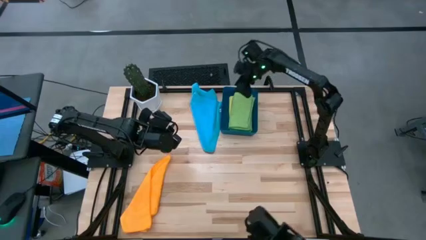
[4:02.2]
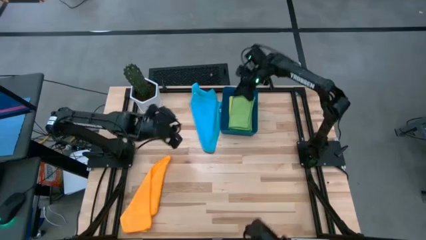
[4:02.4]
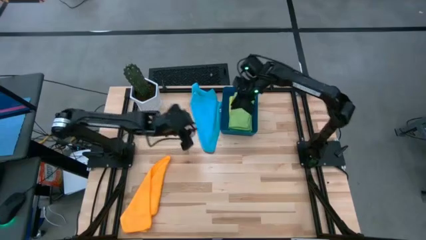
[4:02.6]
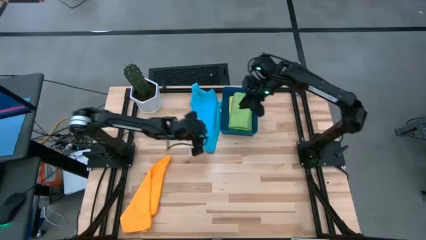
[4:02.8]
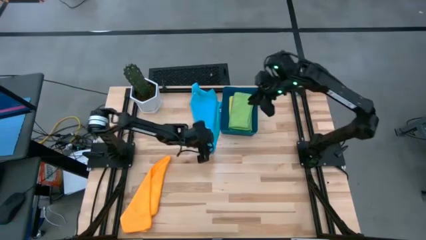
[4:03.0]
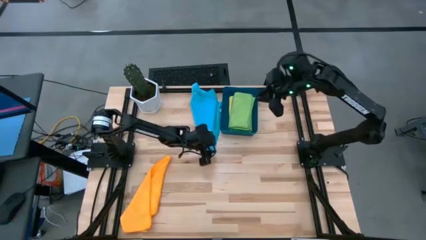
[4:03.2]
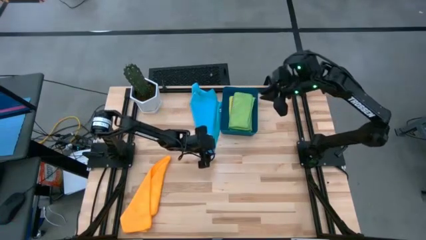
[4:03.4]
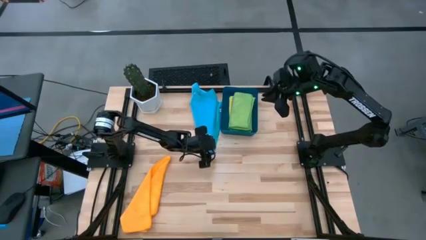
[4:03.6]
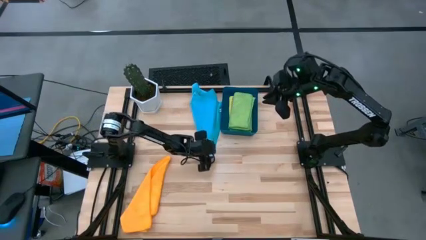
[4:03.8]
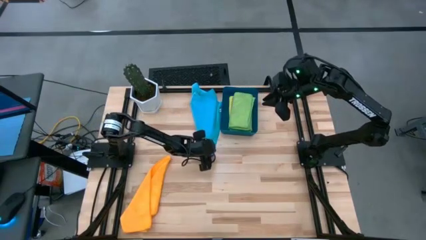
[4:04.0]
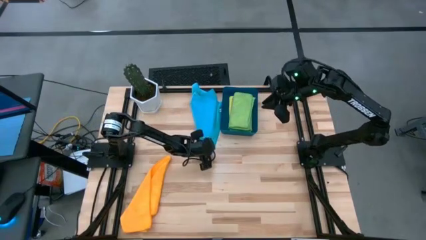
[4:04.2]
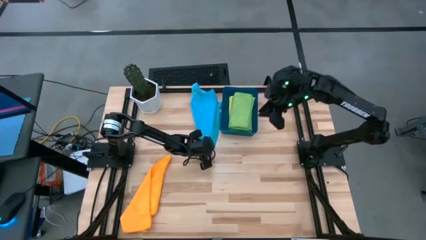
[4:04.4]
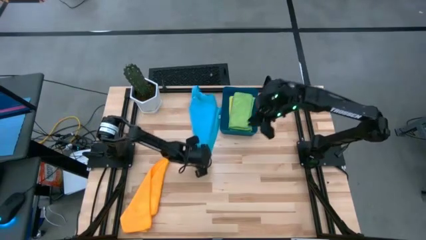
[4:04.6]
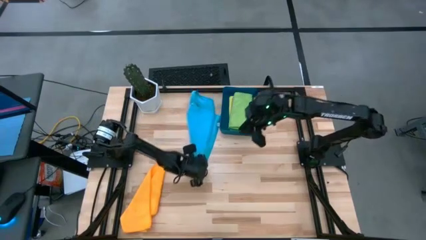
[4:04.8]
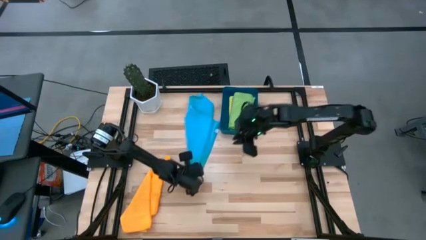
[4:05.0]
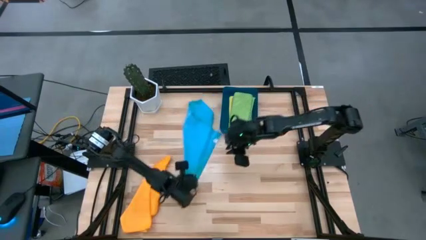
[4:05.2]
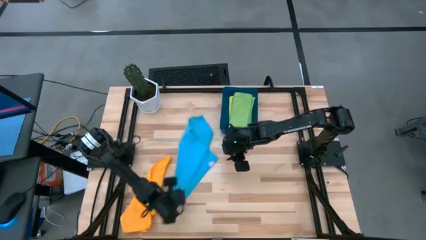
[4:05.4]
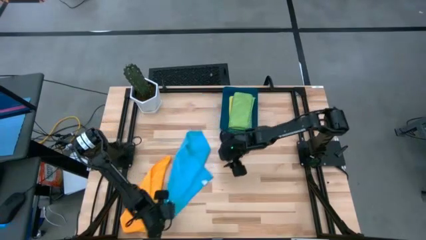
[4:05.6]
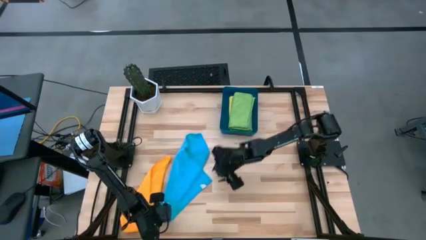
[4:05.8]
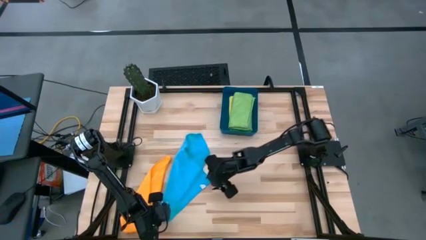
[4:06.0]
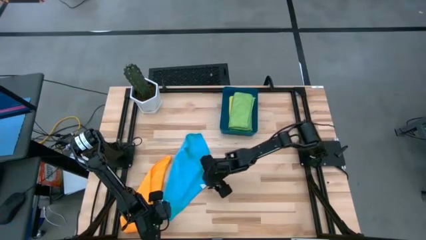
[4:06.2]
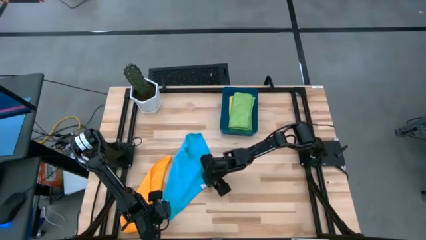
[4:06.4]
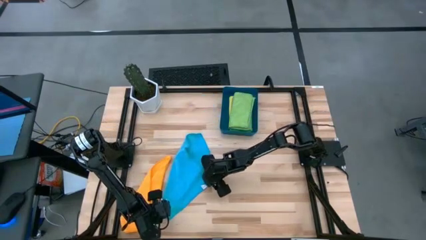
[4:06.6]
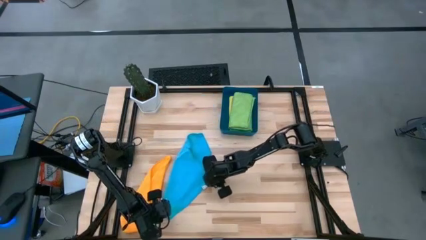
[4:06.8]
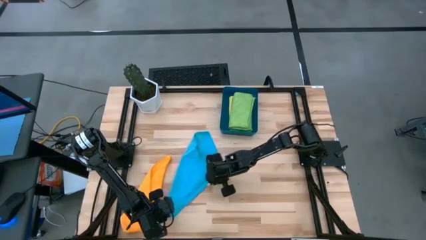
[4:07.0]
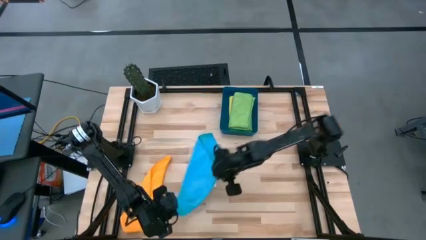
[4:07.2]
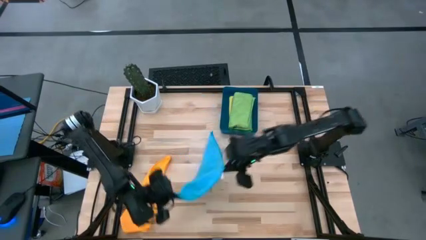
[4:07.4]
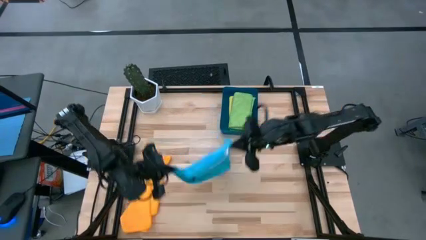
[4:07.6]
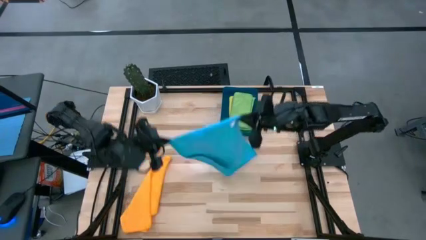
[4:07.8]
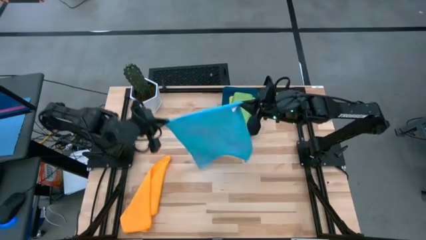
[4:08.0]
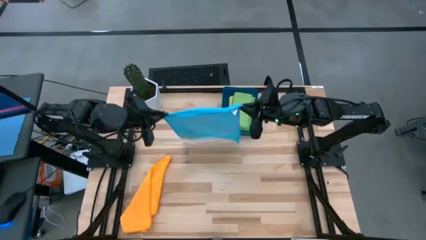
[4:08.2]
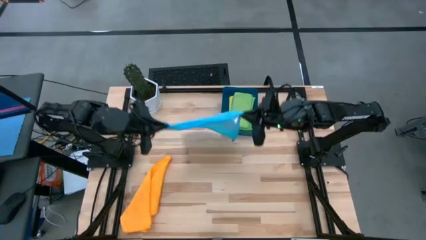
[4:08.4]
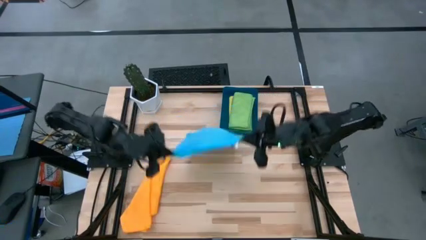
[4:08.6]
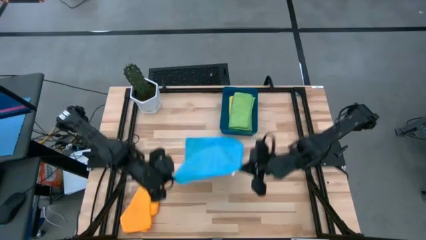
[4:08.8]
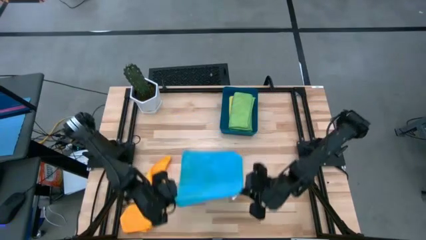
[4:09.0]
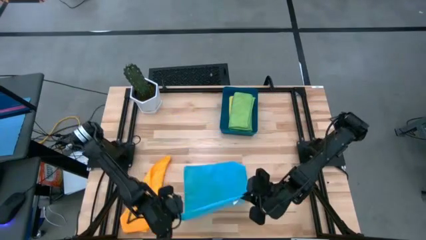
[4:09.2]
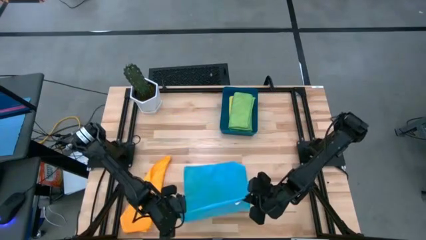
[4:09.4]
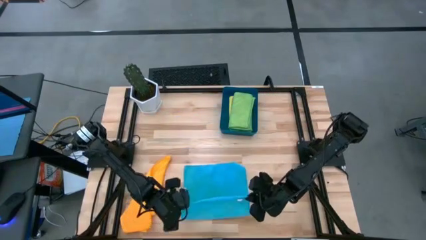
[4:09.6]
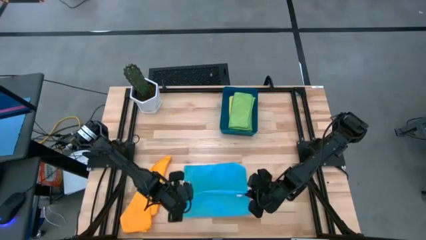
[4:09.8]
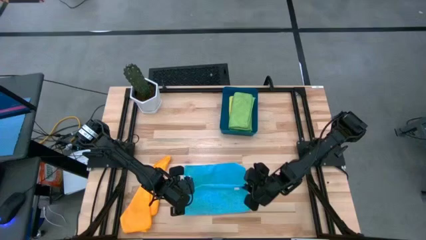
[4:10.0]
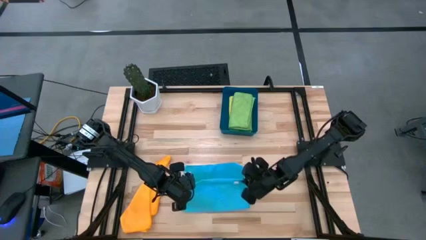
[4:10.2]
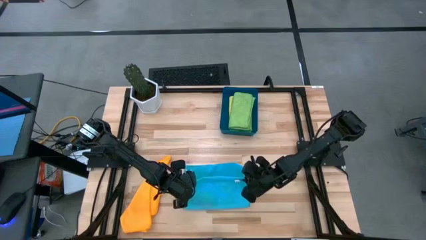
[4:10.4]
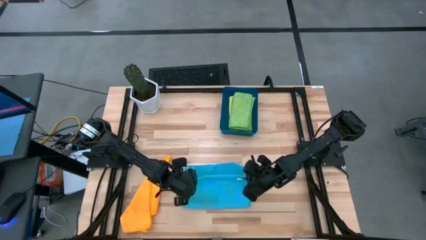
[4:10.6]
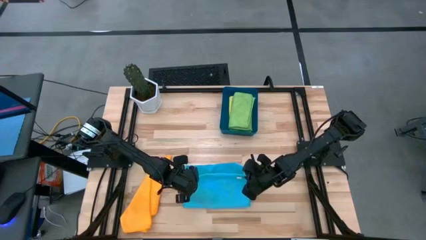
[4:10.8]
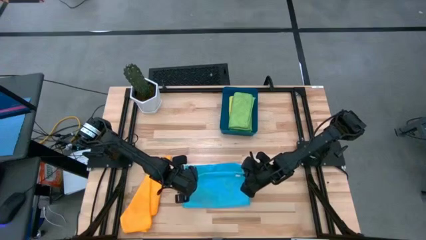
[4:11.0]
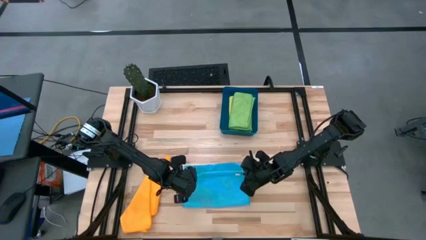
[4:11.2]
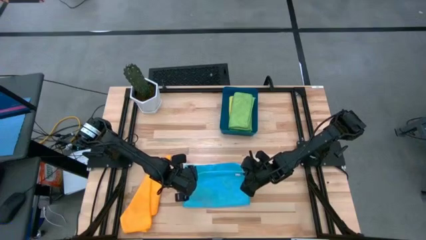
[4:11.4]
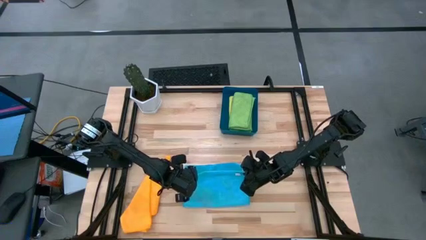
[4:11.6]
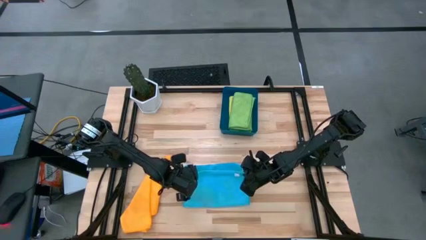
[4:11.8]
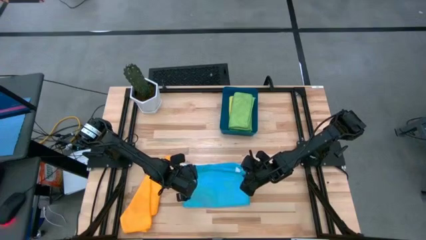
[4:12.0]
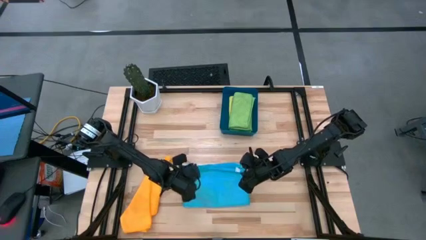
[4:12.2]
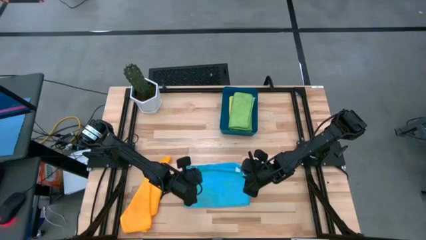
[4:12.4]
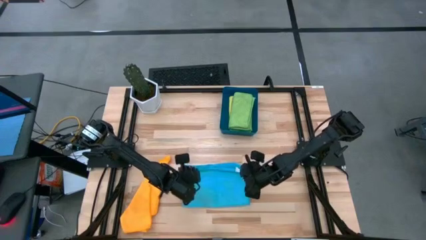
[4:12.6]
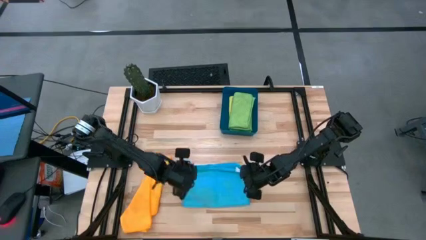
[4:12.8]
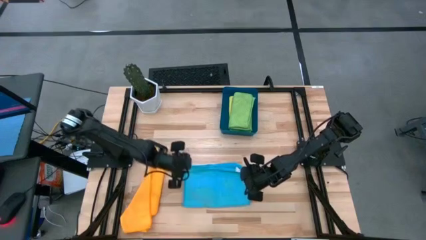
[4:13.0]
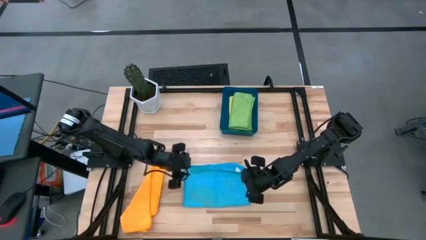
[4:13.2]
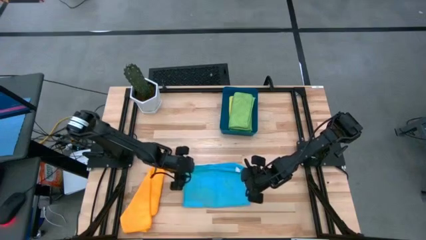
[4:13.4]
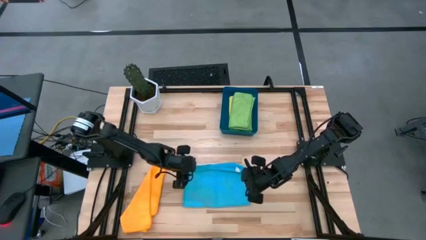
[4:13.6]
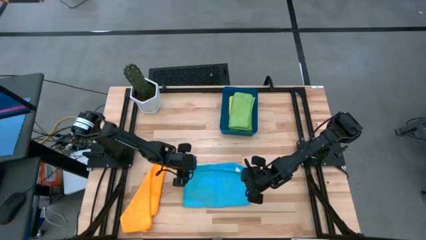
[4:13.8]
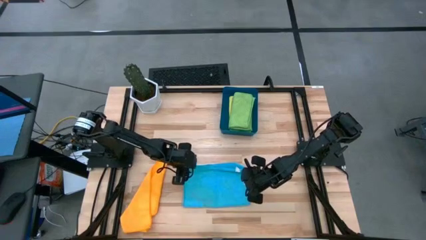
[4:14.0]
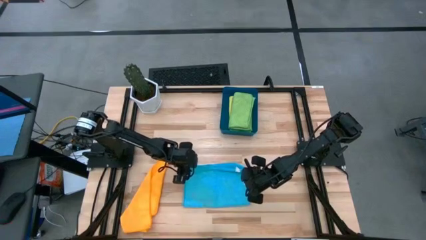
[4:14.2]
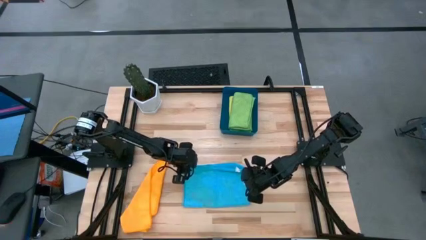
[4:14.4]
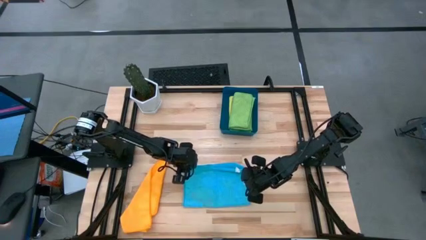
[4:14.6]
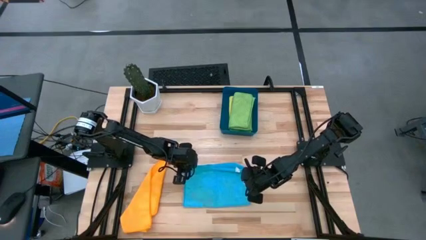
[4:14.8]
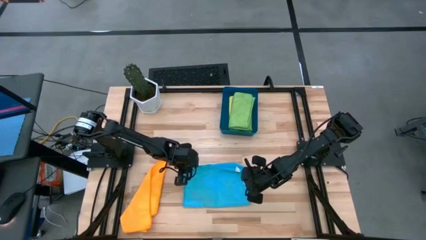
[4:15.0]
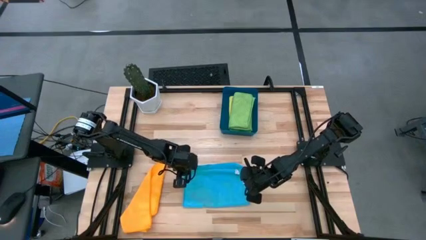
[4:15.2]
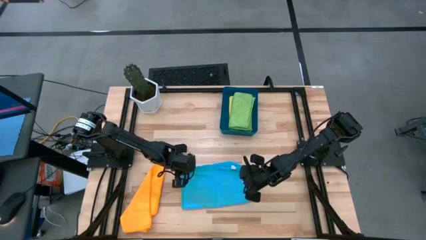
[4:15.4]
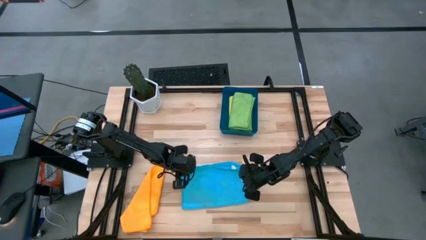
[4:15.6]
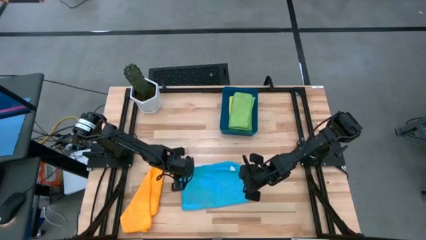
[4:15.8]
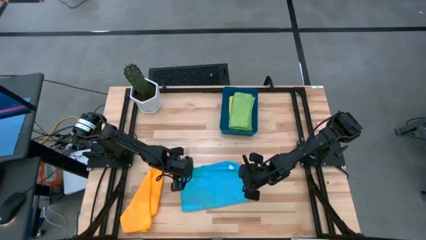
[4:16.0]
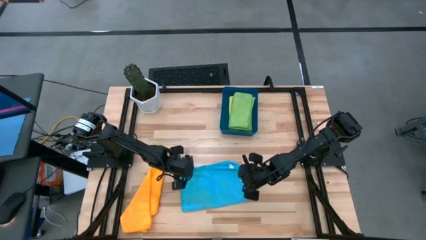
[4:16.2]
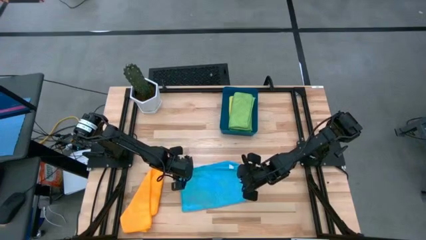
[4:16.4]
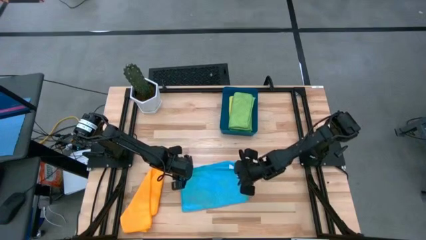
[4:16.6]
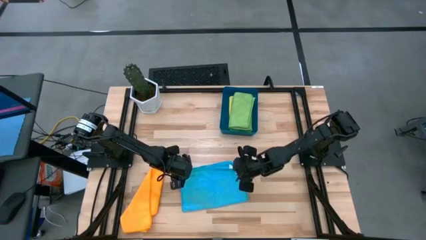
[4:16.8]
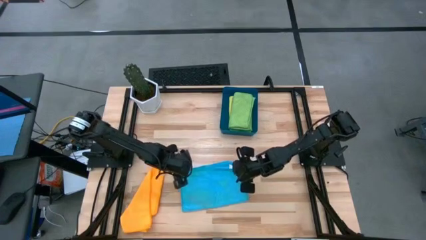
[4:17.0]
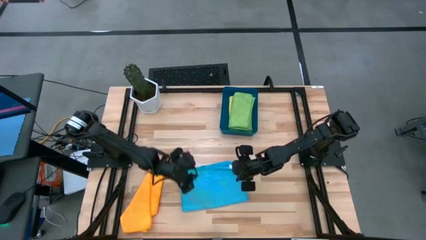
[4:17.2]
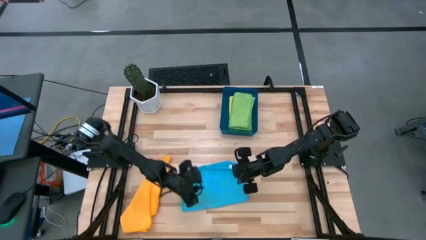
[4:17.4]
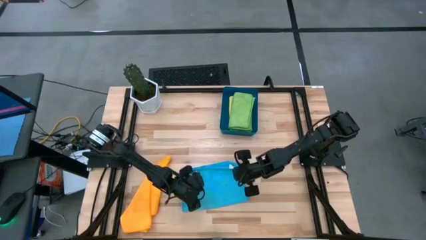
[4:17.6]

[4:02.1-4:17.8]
Task: Fold microfiber towels
Fold the blue towel
